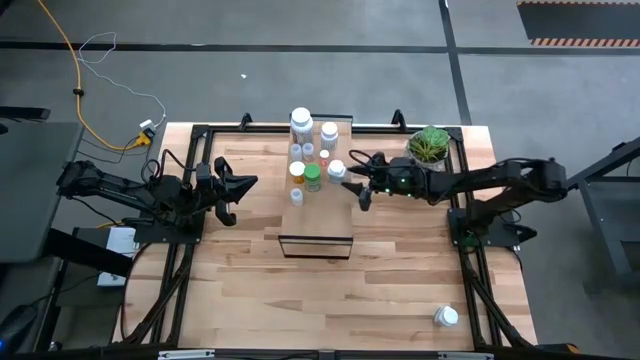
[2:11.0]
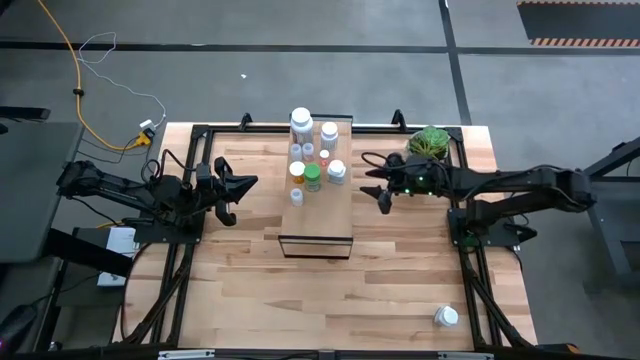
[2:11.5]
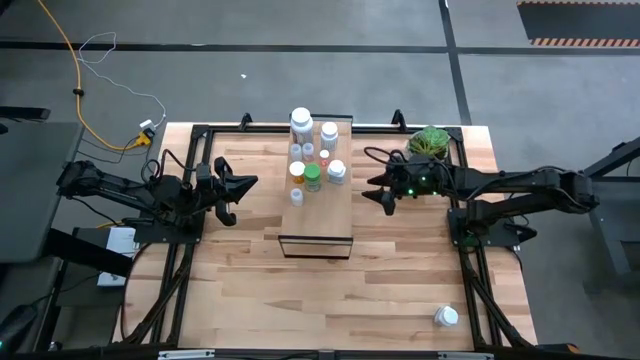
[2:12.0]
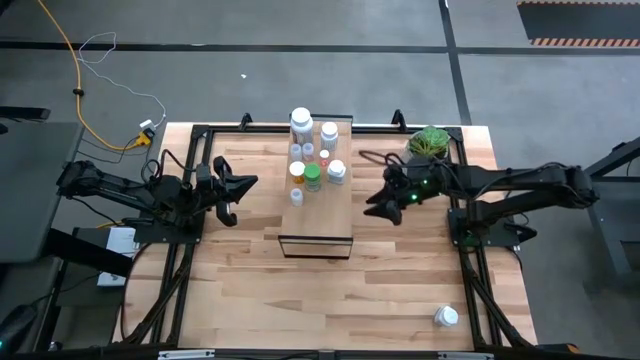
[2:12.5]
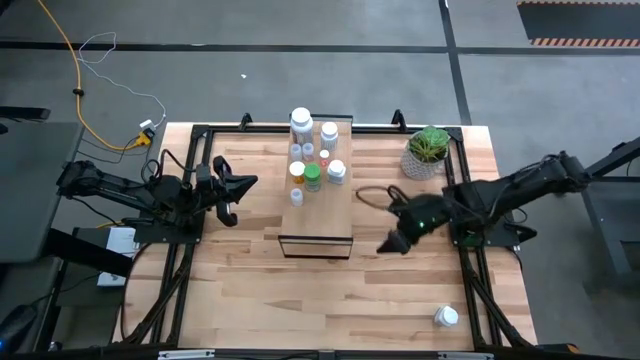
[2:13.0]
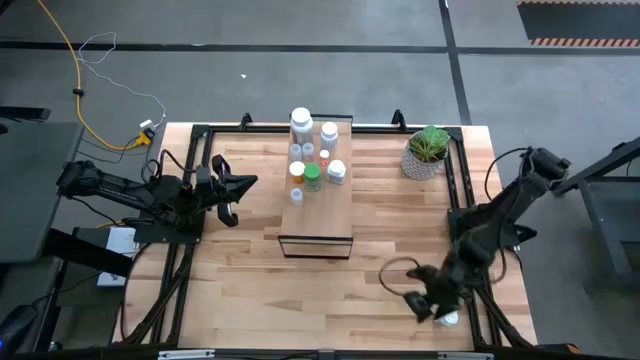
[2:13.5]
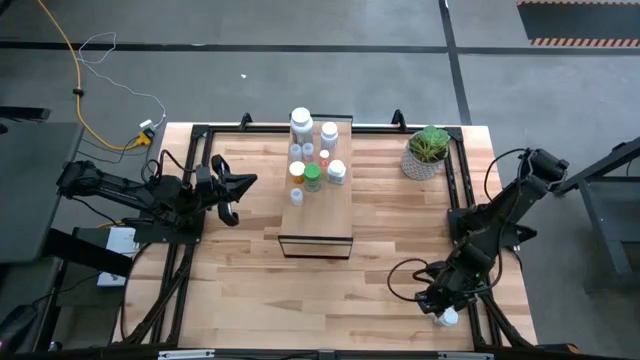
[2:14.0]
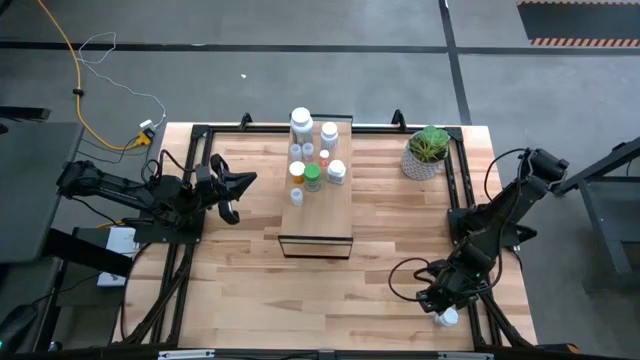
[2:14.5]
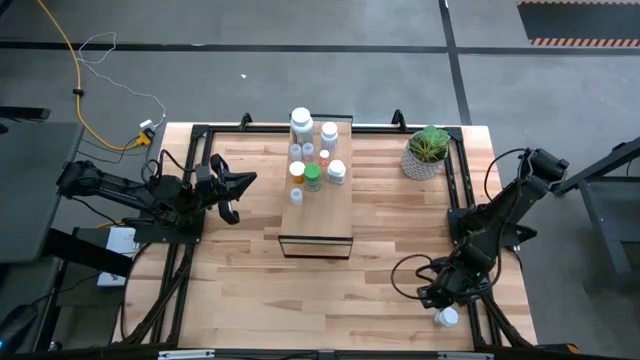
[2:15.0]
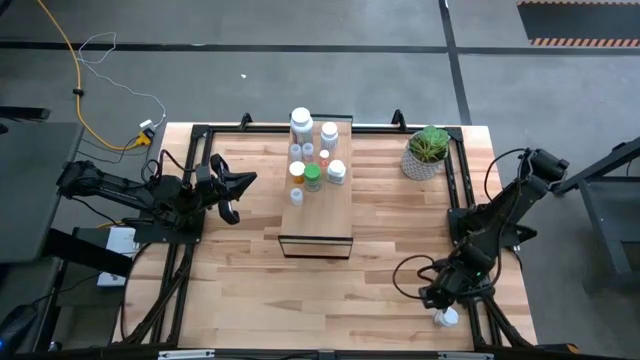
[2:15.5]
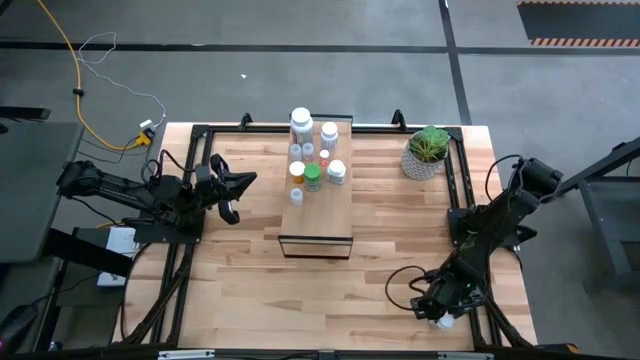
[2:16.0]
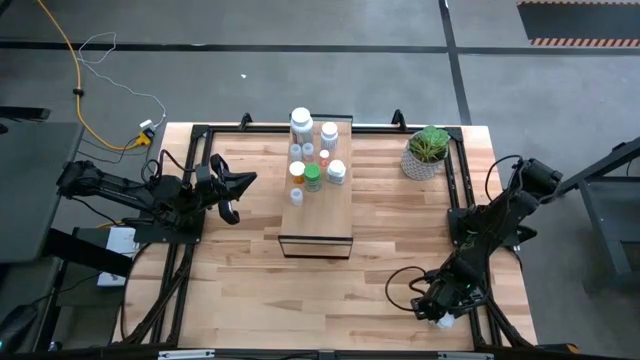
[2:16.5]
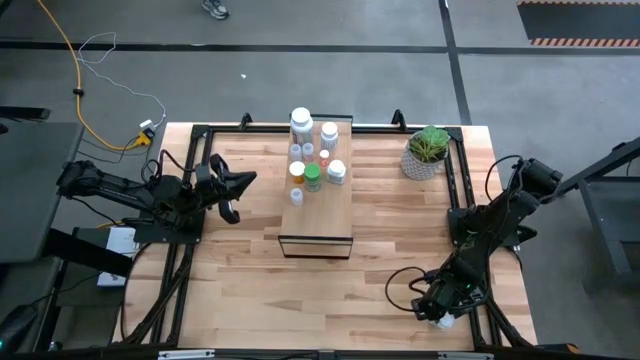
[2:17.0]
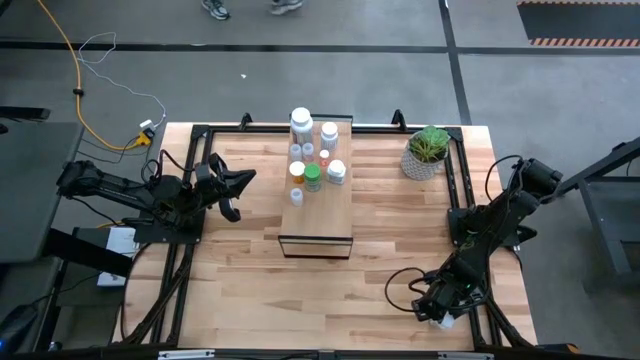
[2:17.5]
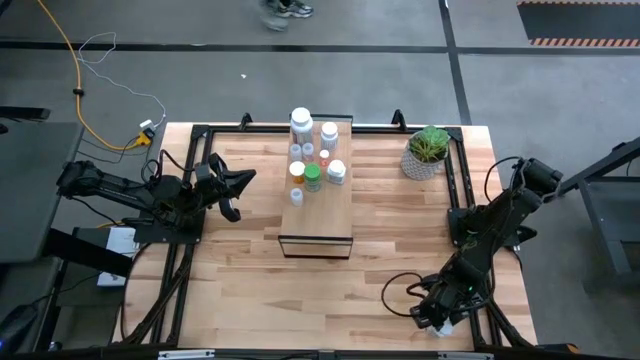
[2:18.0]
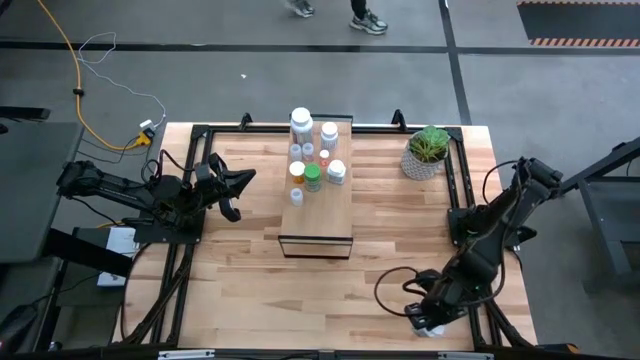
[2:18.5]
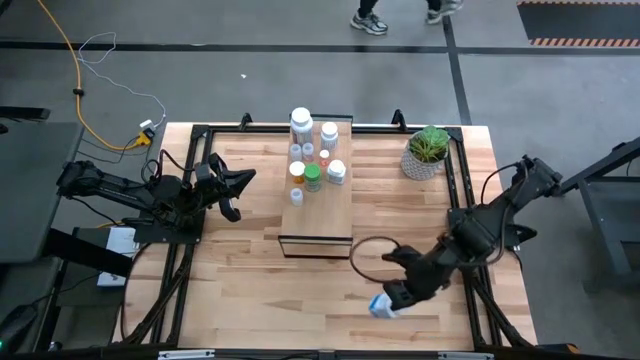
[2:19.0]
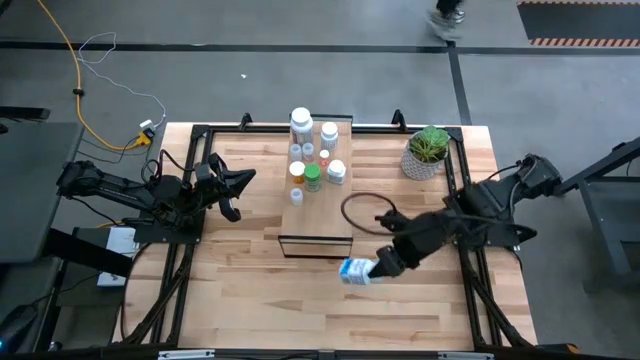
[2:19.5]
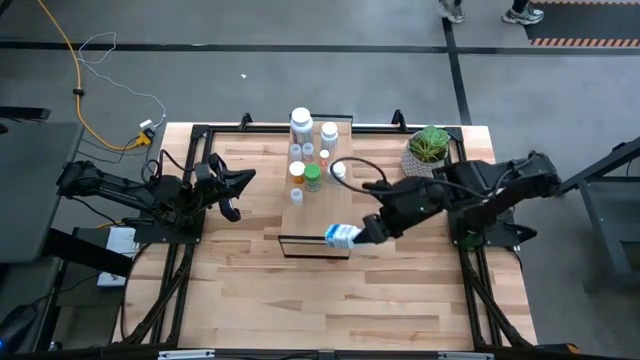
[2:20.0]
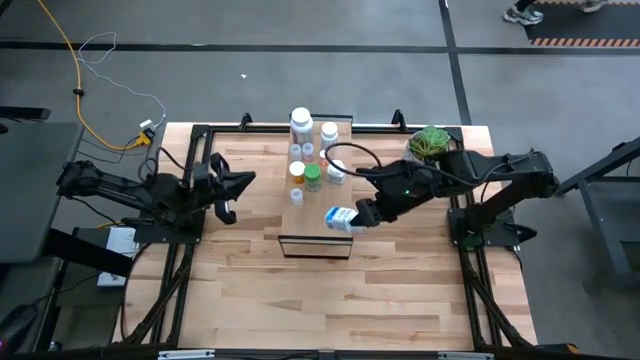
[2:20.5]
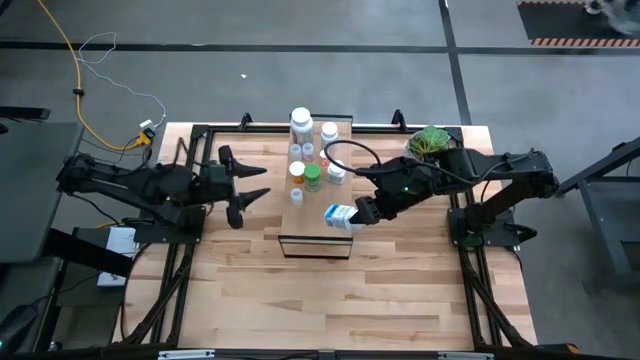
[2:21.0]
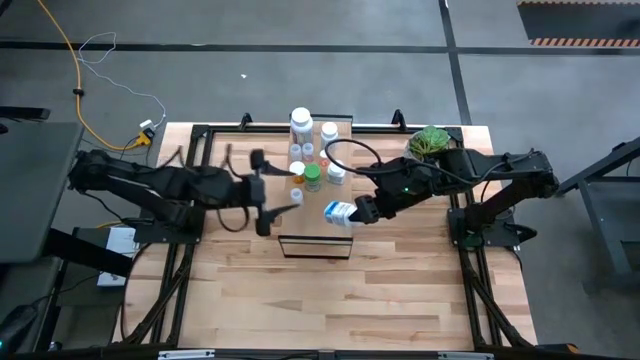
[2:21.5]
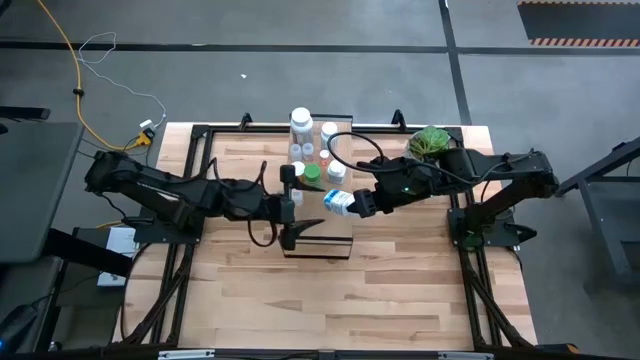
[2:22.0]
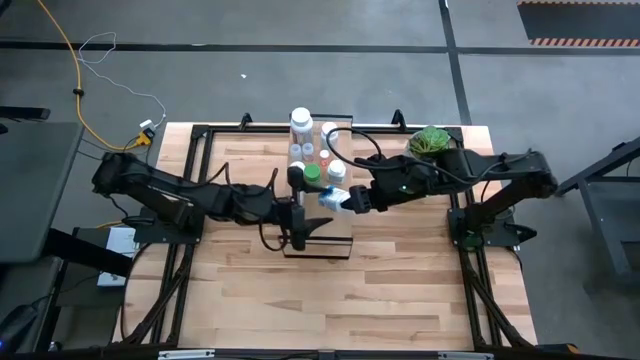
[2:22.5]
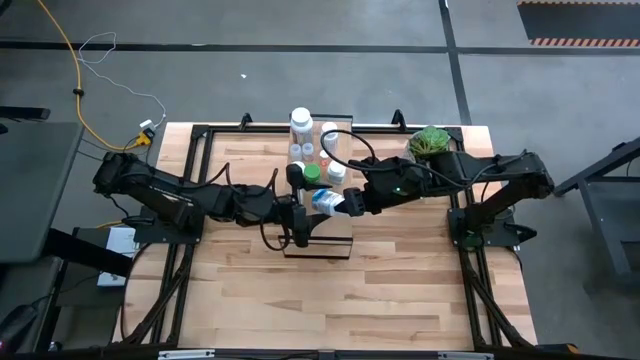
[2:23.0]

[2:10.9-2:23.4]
Task: Pick and place medicine bottles onto shelf by color
Put the blue medicine bottle on the shelf

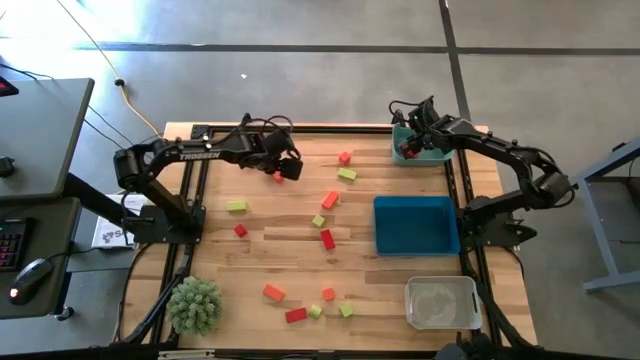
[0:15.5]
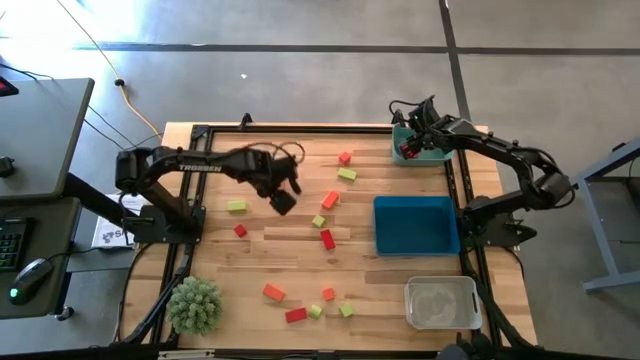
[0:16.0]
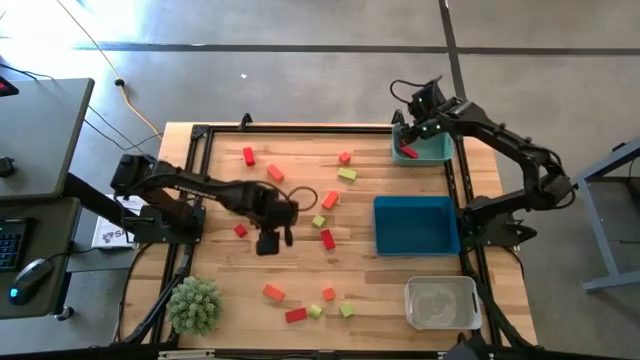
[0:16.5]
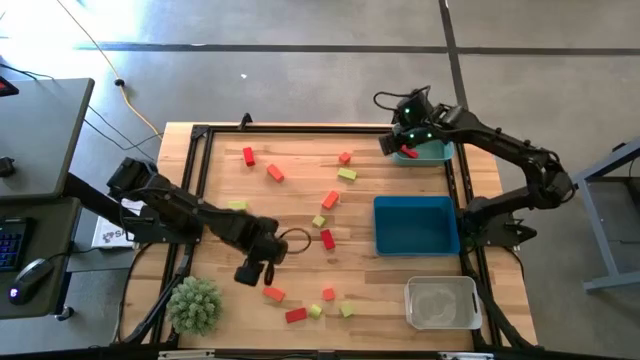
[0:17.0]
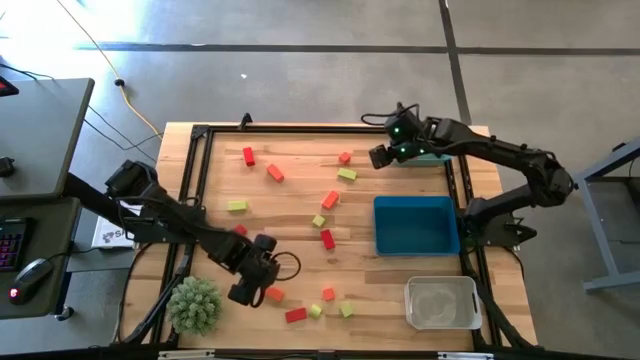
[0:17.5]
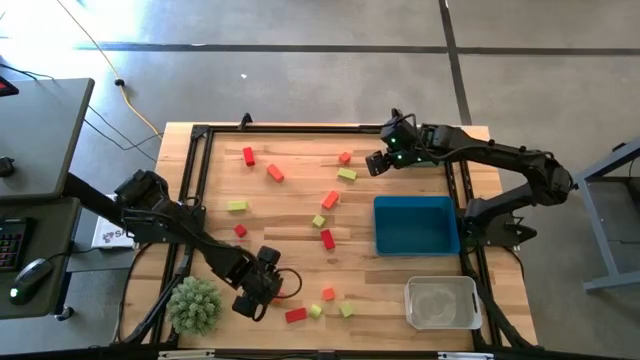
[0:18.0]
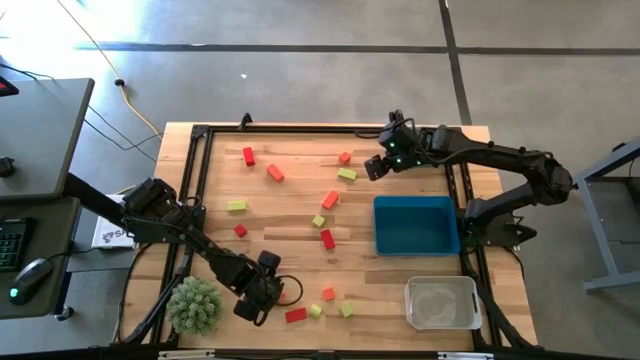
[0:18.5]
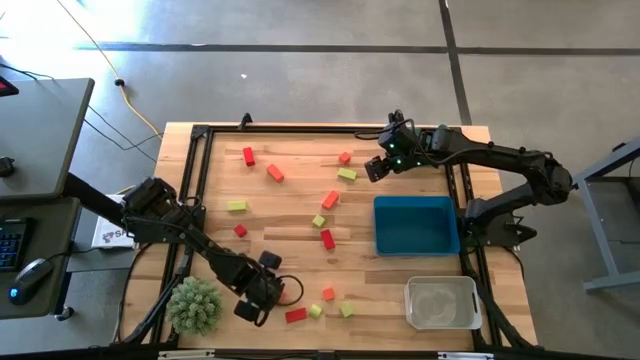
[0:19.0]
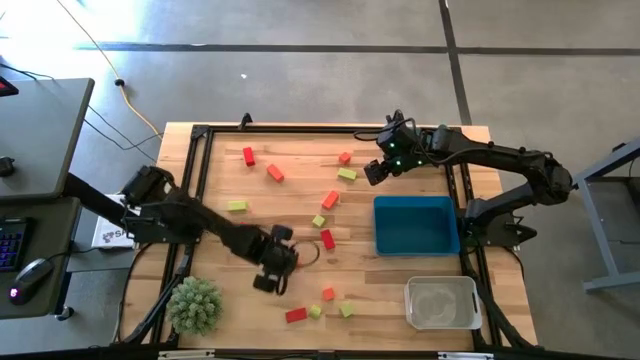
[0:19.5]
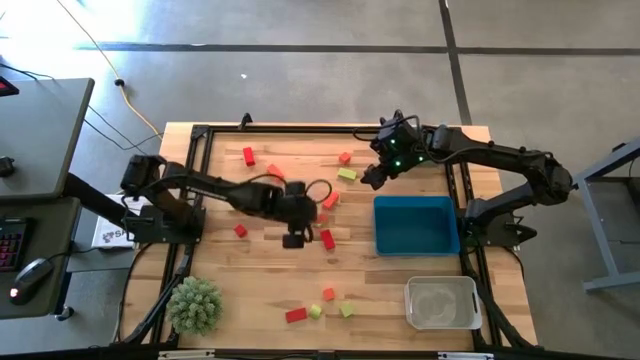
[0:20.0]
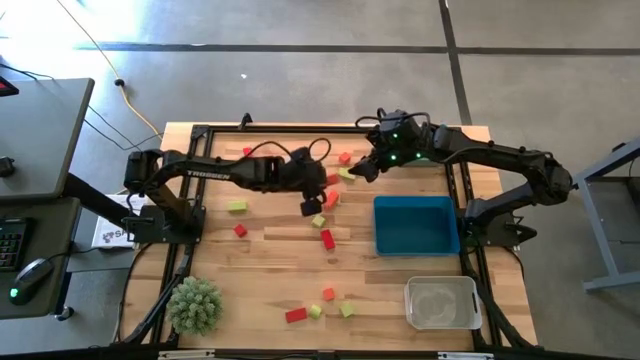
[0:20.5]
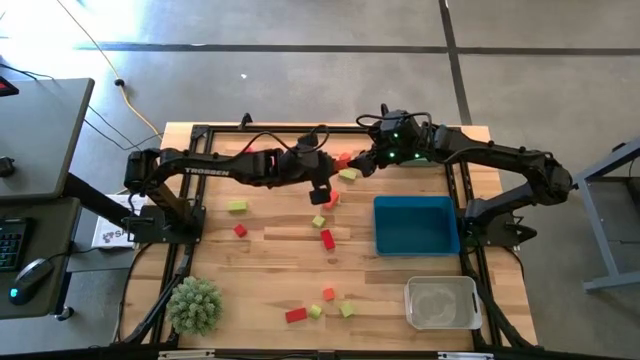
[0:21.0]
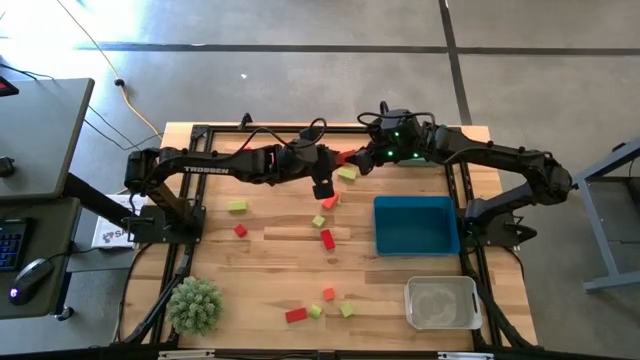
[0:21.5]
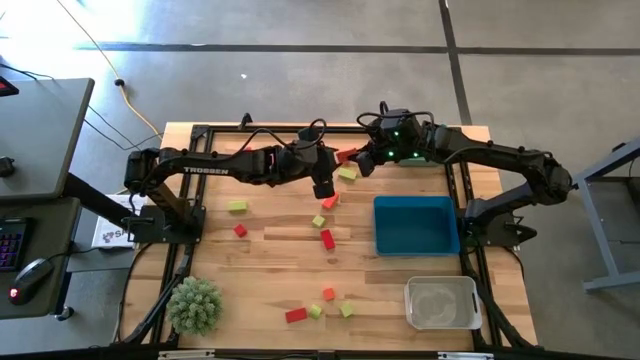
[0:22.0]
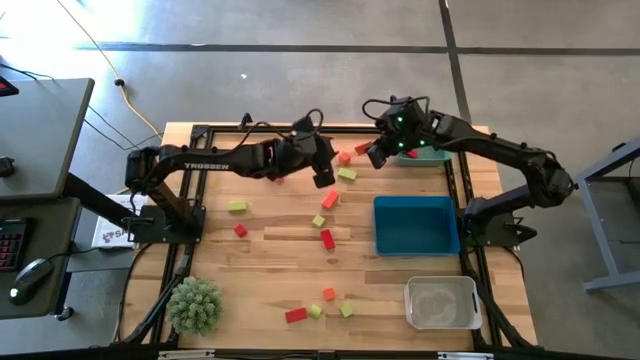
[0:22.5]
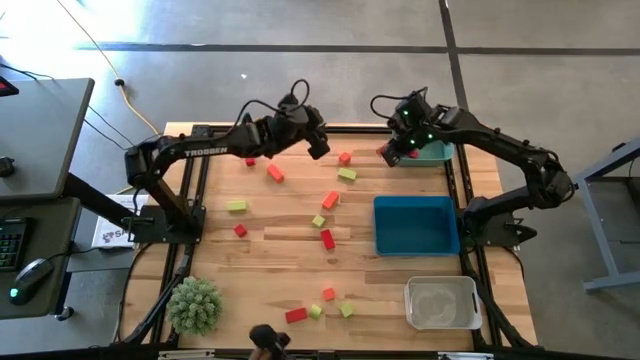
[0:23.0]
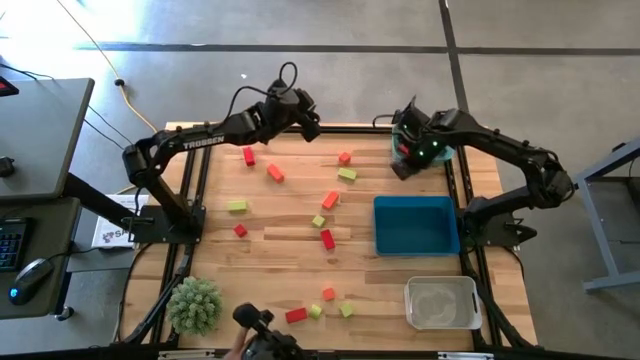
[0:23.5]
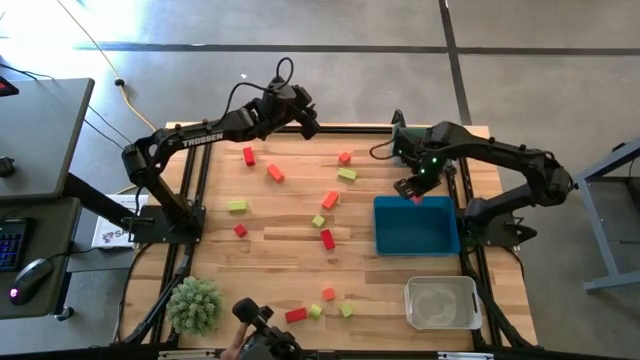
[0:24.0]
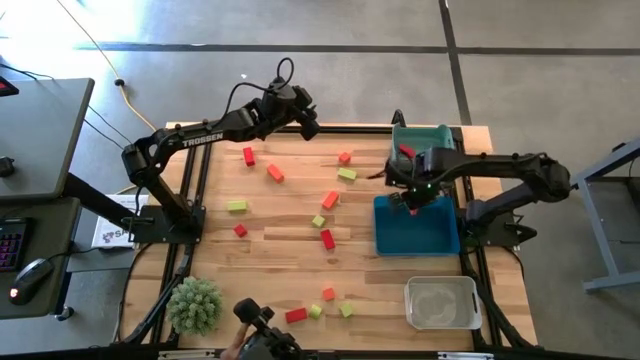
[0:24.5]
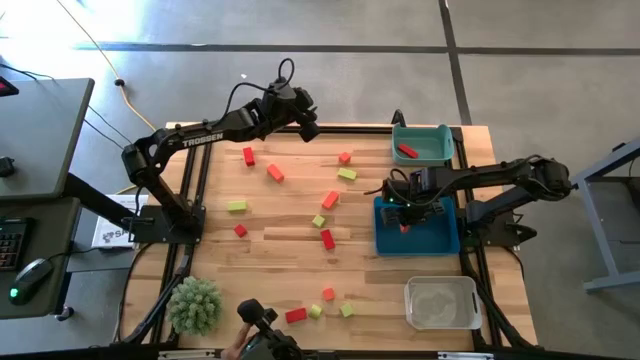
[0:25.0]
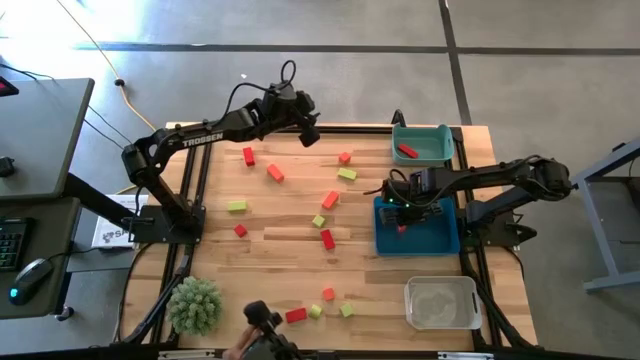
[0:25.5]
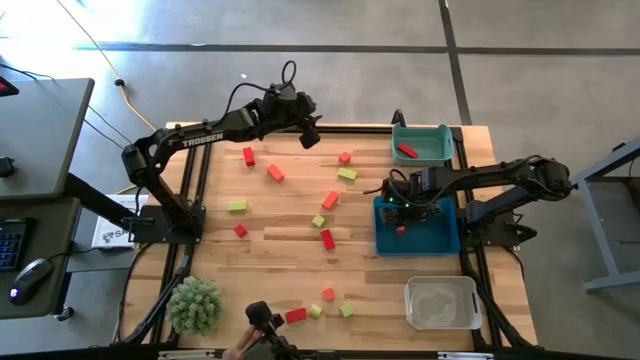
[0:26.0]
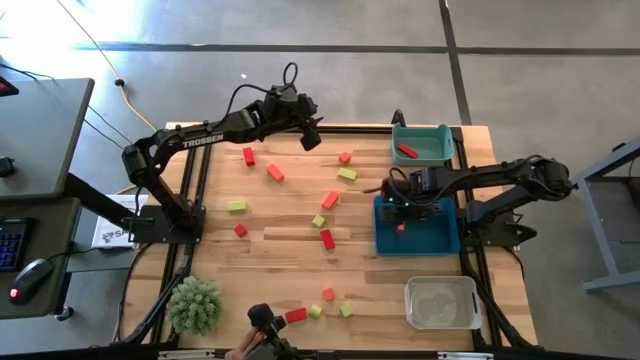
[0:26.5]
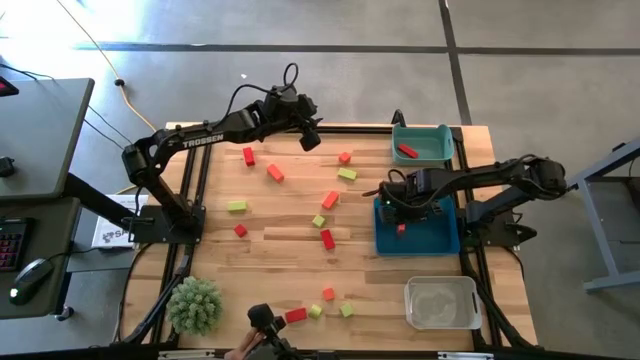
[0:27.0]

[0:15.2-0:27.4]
Task: Sort & place blocks by color
Put the orange wooden block into the blue bin
